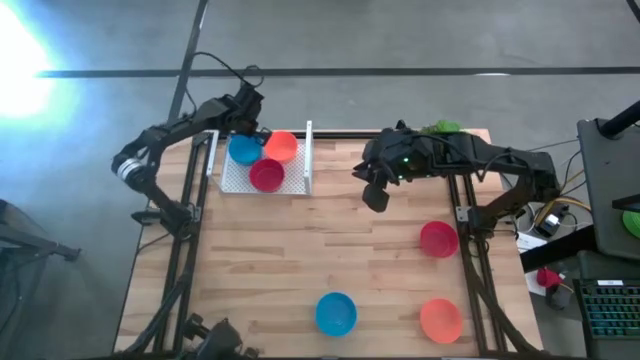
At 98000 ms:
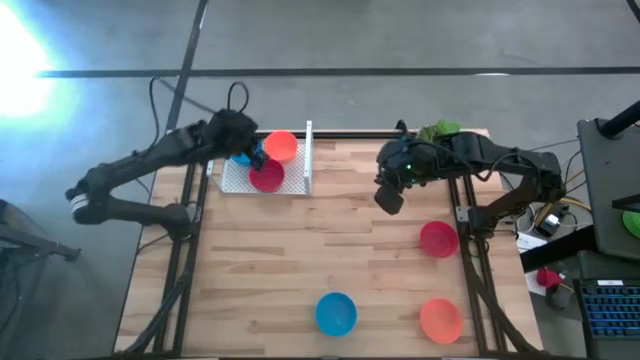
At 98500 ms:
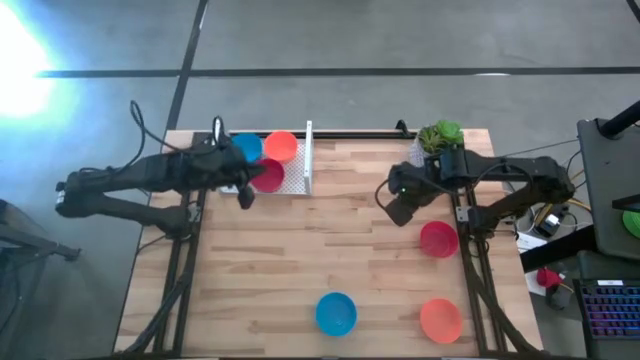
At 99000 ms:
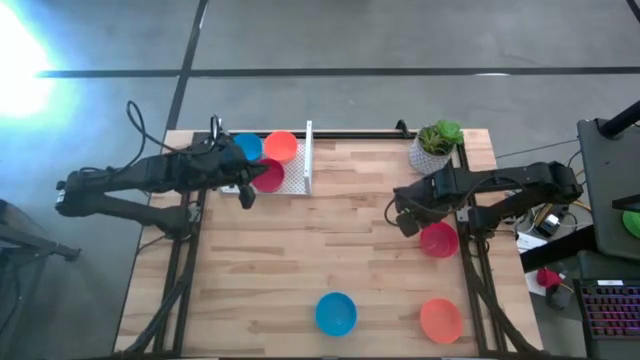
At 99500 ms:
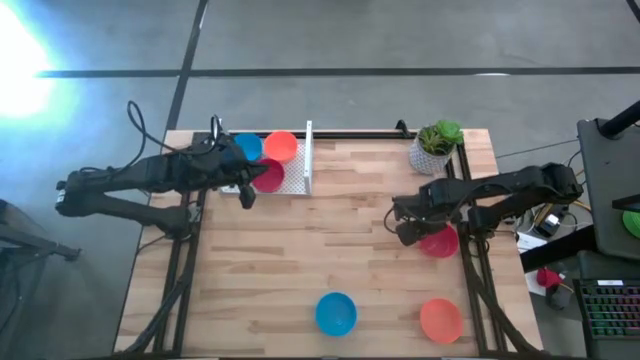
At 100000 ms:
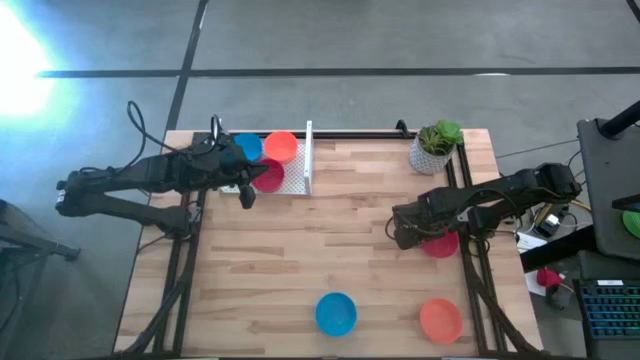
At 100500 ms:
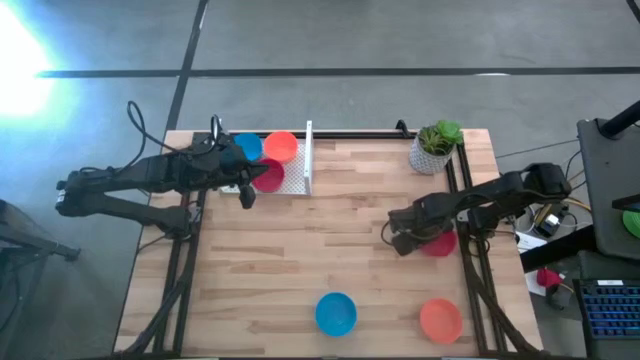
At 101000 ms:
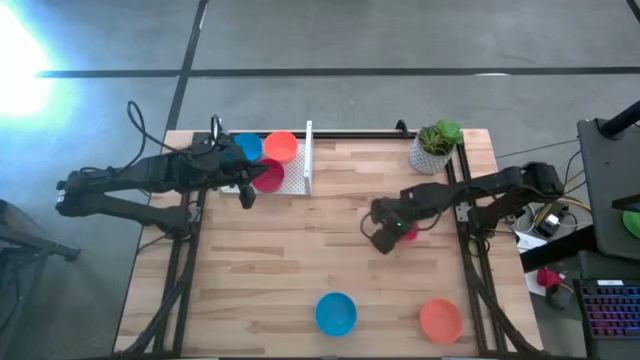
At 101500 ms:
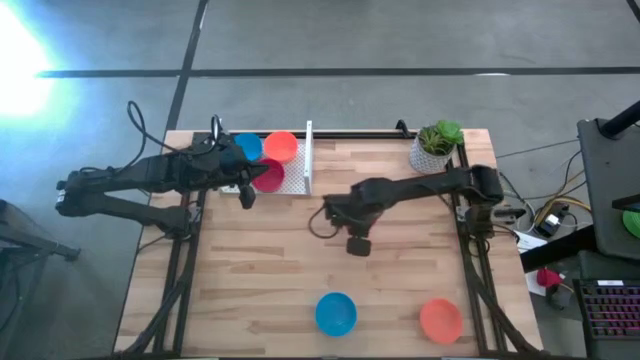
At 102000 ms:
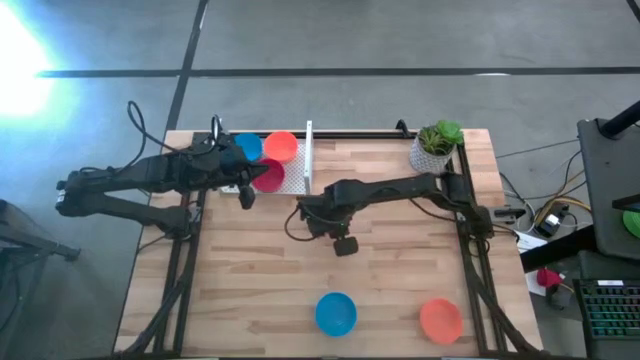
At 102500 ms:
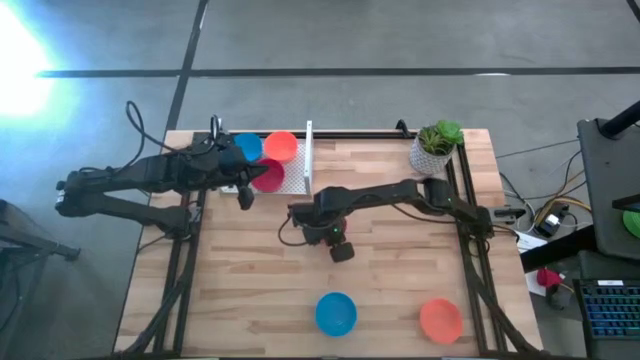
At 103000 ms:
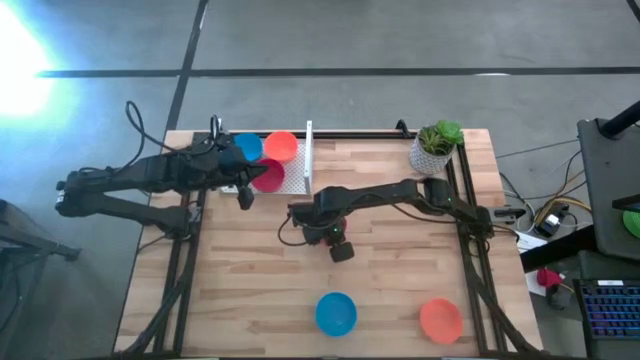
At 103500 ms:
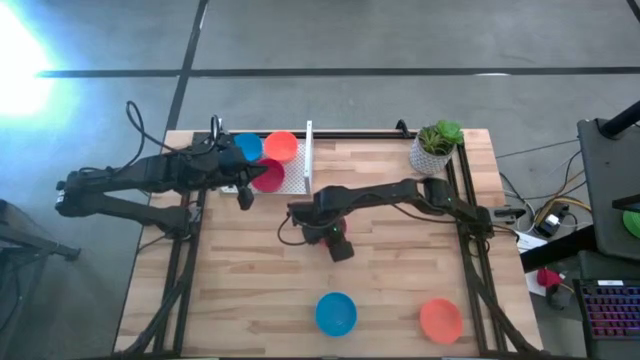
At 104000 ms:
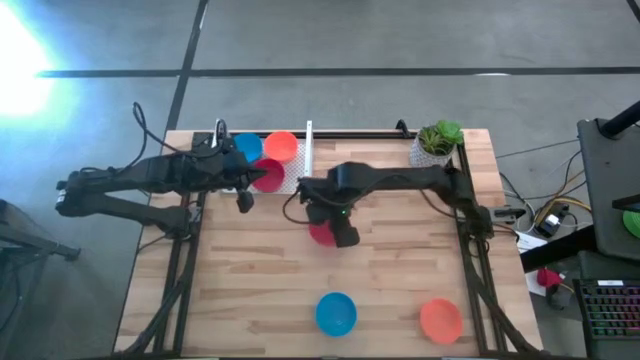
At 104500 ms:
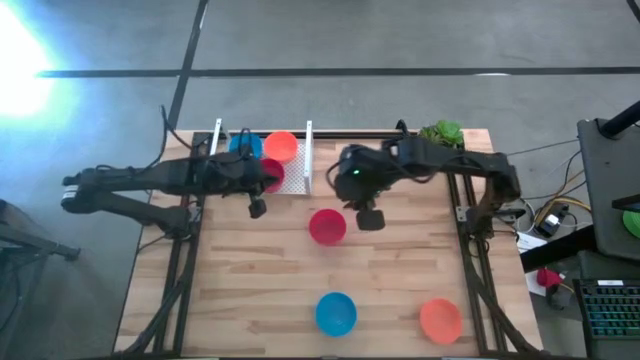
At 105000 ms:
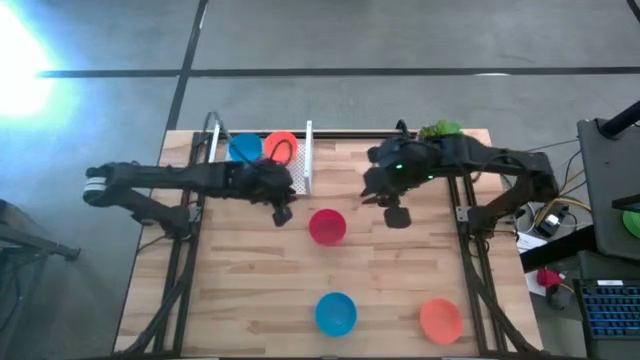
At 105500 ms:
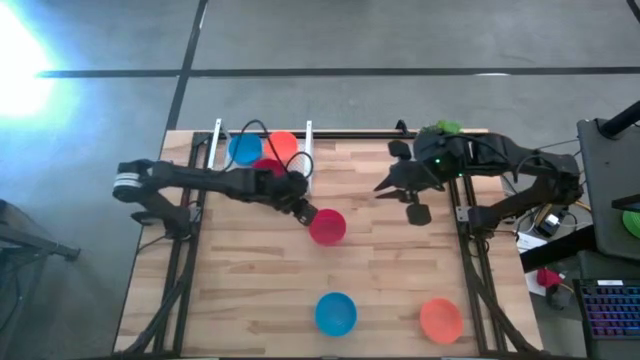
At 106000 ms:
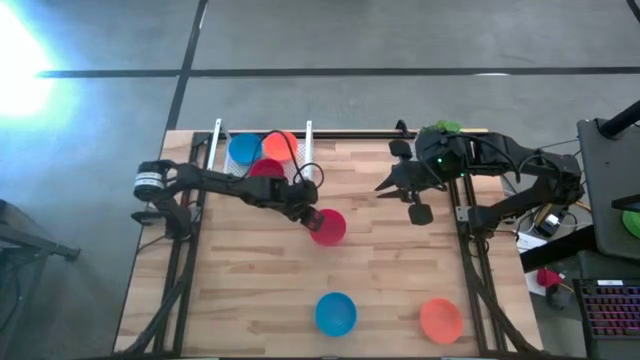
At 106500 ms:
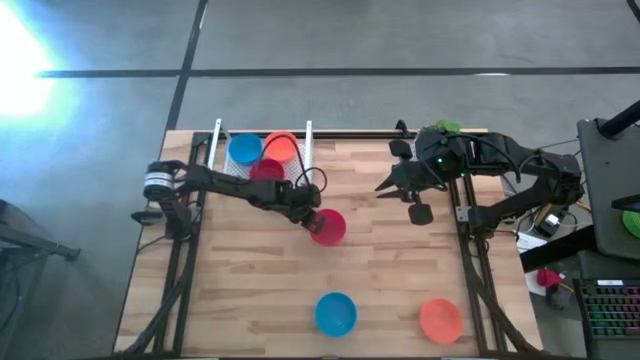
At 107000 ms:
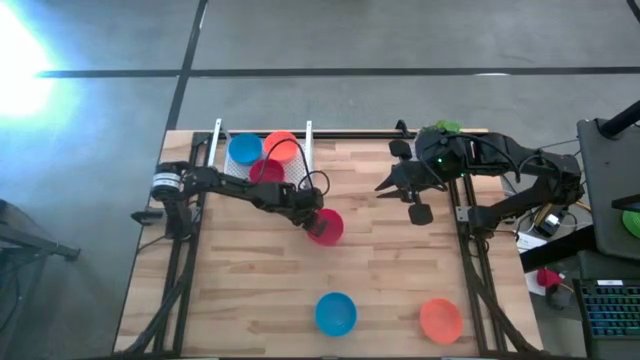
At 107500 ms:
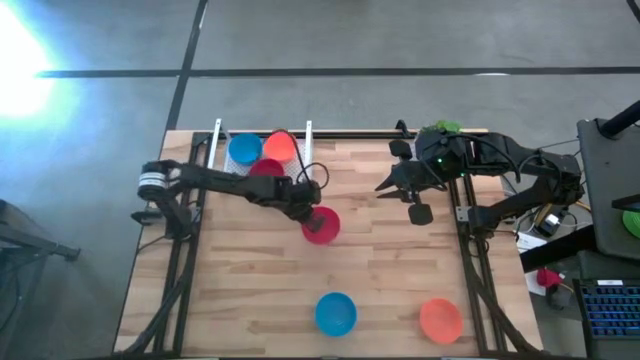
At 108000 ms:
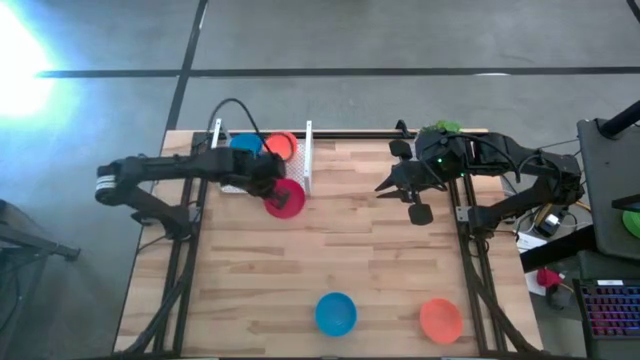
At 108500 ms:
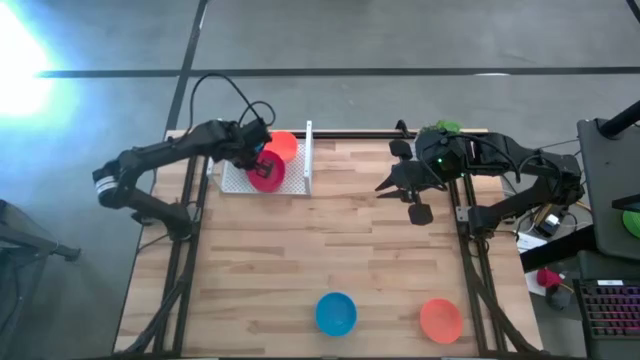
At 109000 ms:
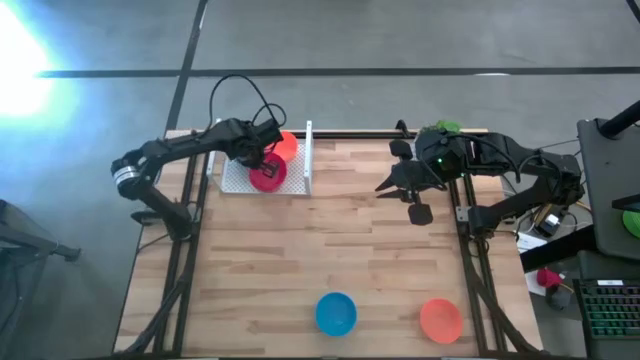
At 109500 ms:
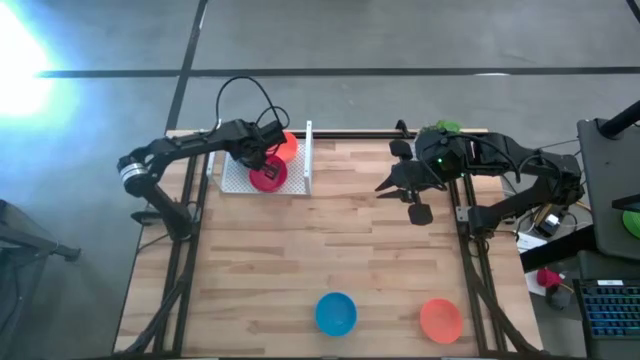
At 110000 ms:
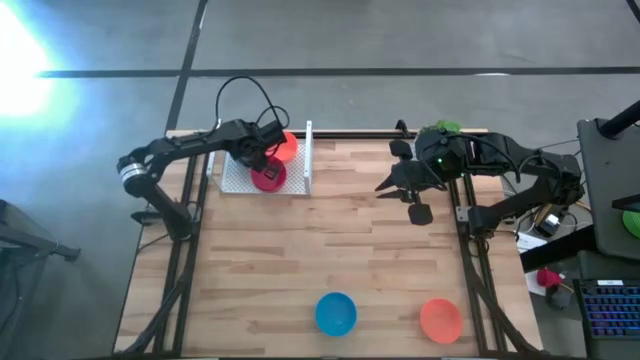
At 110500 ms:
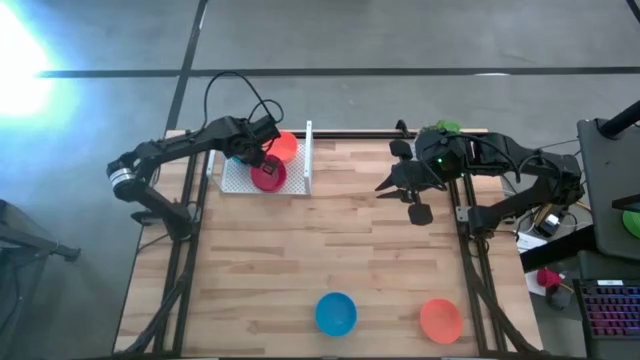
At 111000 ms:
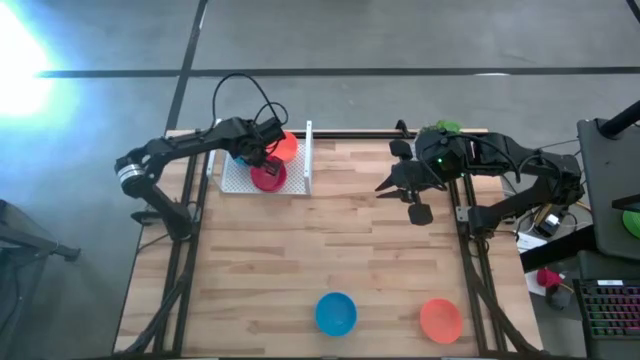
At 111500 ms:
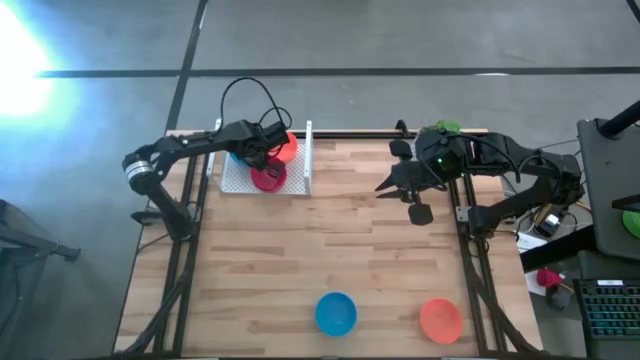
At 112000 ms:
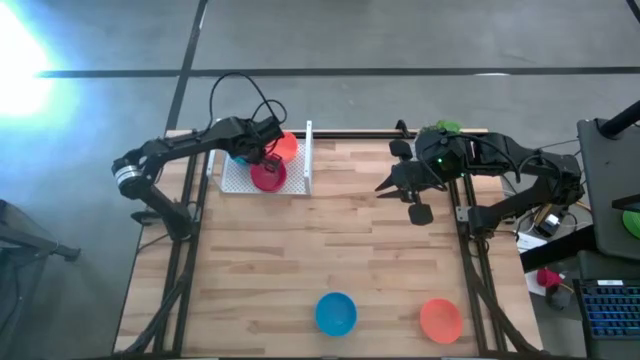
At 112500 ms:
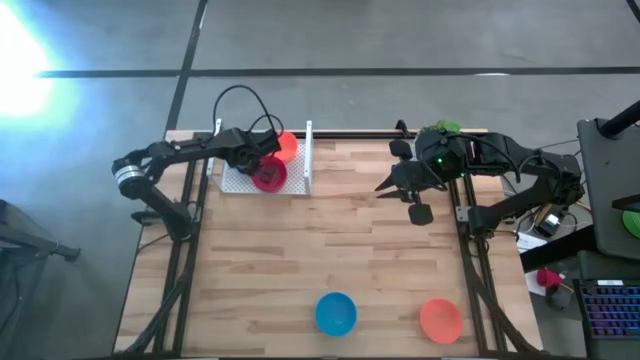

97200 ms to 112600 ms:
Task: Pick & Place Mini bowls
Stack the red bowl on the stacked red bowls on the shelf

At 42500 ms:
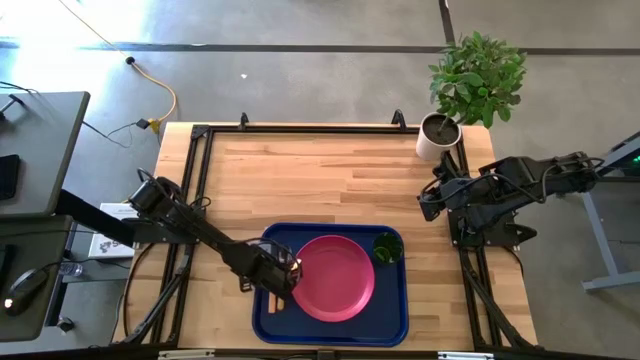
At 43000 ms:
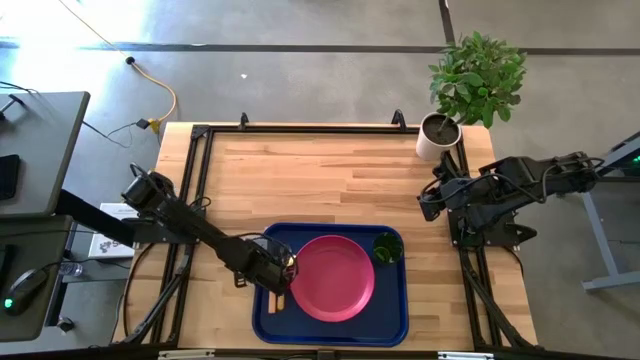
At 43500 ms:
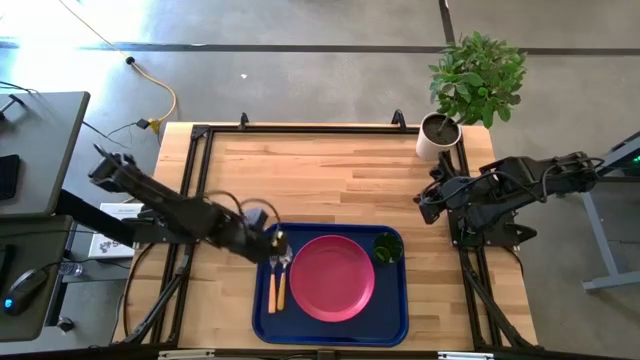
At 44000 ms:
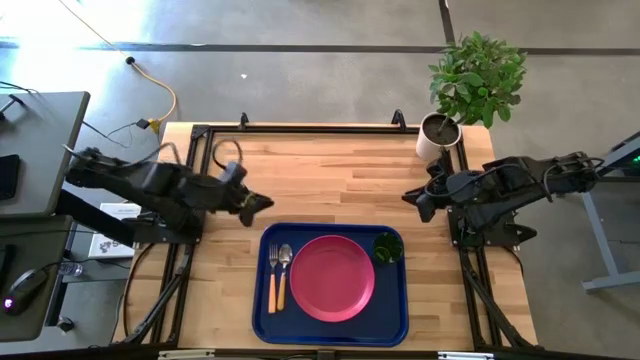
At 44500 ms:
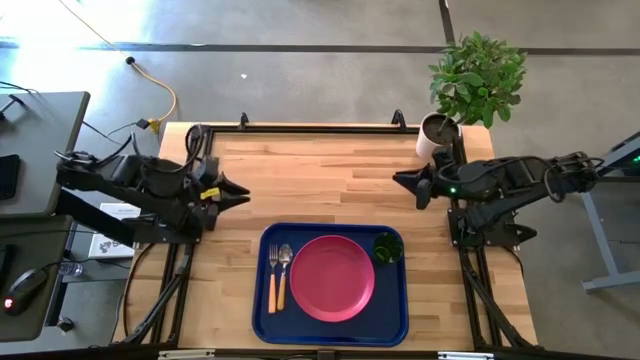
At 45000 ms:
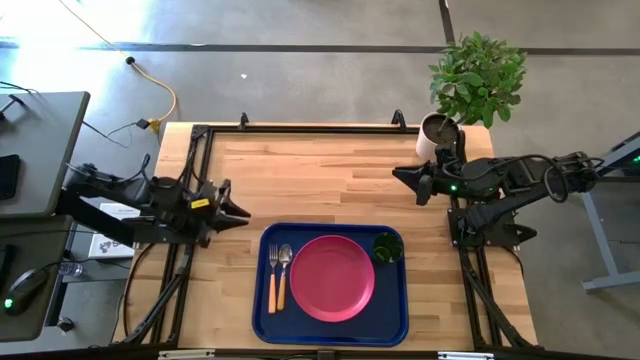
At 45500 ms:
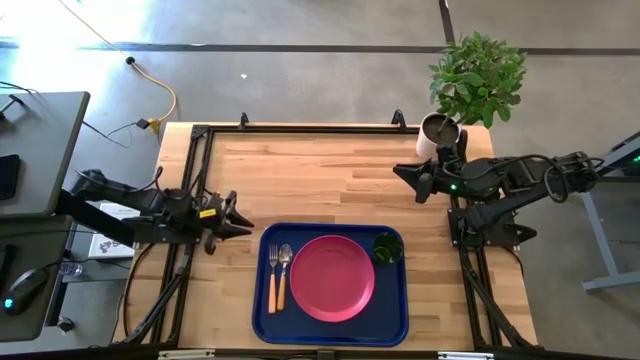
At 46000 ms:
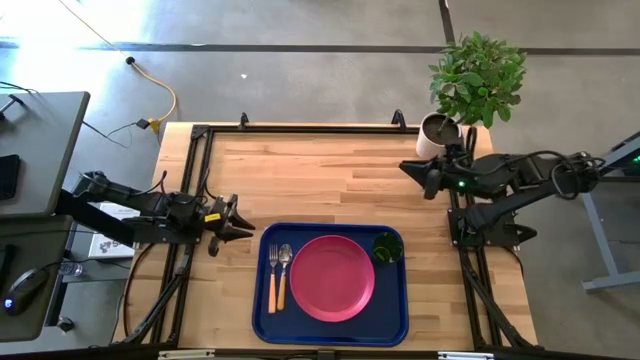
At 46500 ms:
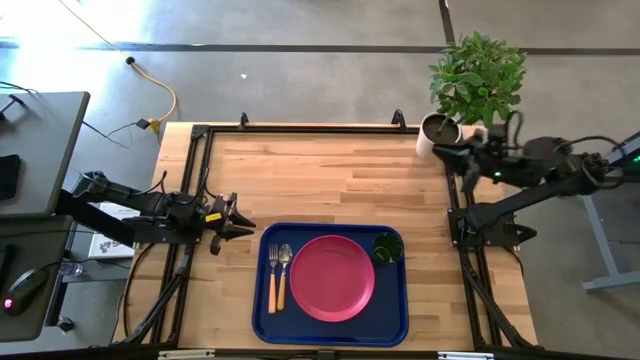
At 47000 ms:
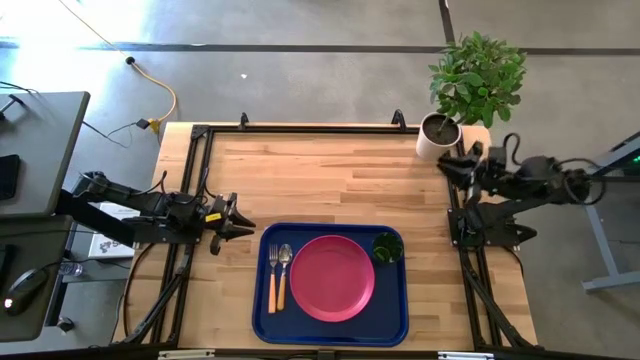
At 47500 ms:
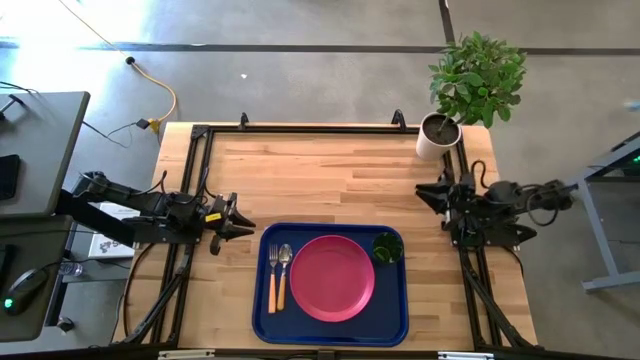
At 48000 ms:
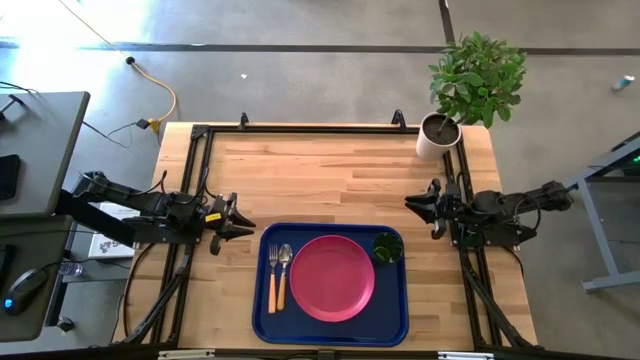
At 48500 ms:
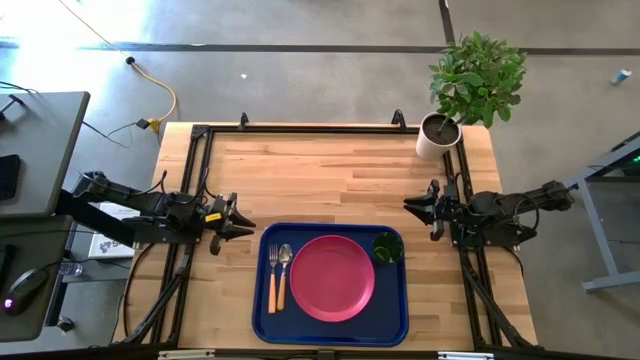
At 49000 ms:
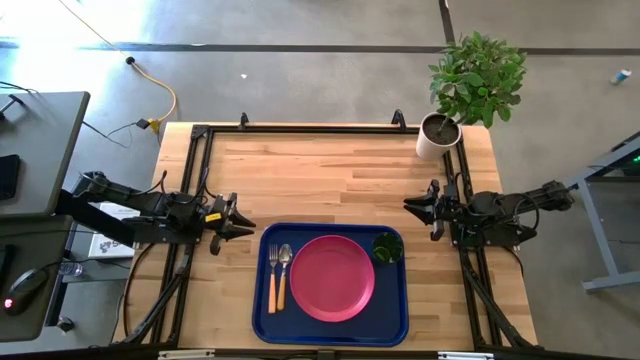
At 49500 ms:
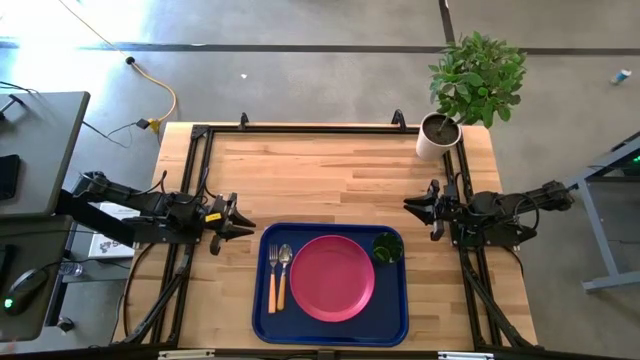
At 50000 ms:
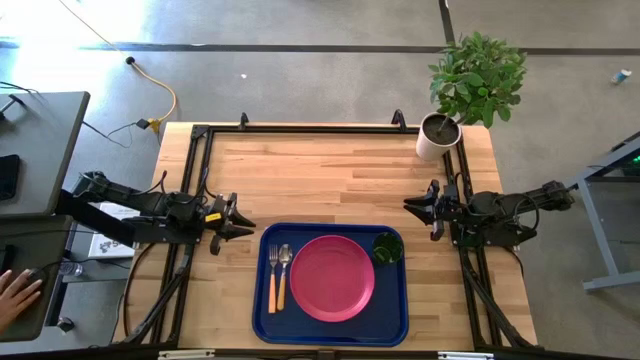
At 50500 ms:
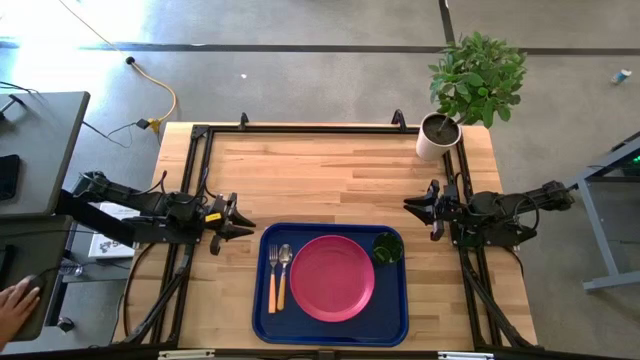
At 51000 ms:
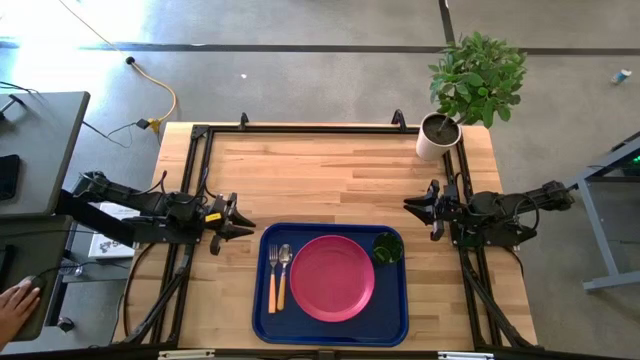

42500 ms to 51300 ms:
Task: Pick and place plate/cup/fork/spoon on tray
Return to Home Position
